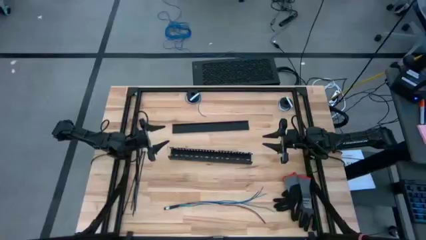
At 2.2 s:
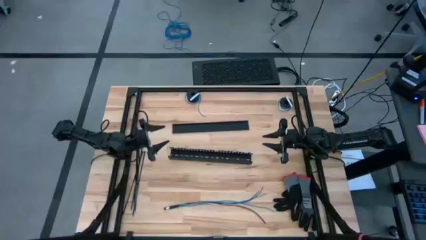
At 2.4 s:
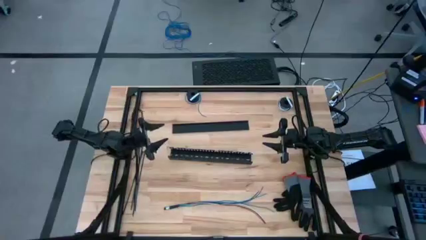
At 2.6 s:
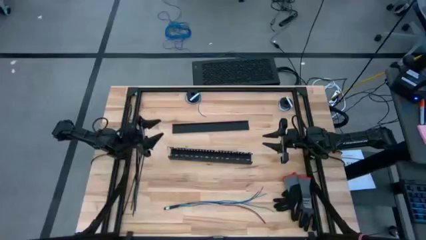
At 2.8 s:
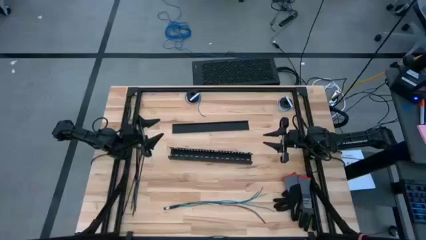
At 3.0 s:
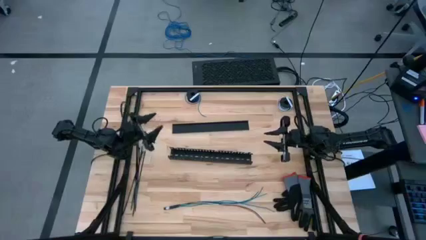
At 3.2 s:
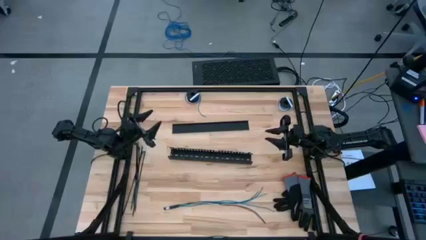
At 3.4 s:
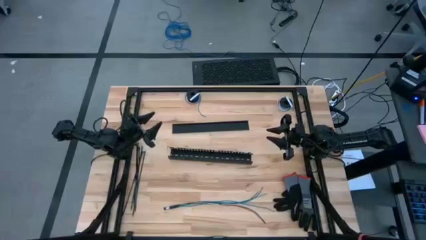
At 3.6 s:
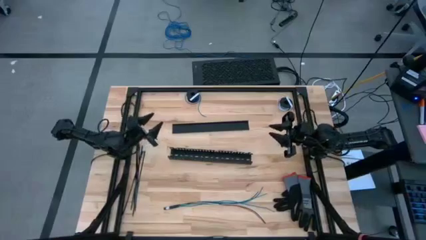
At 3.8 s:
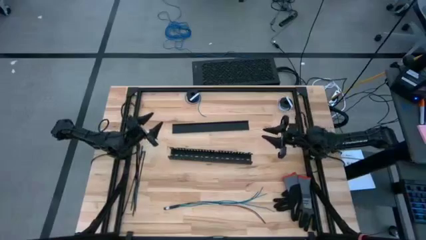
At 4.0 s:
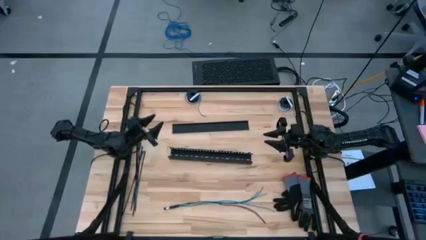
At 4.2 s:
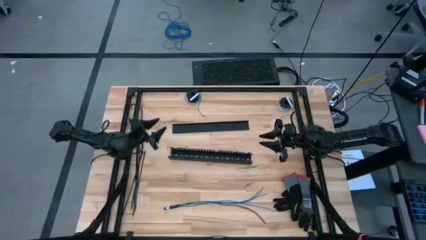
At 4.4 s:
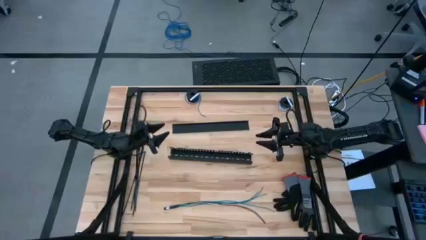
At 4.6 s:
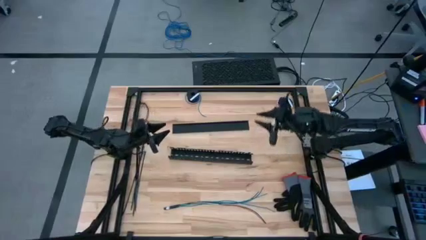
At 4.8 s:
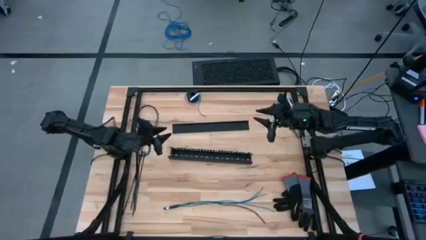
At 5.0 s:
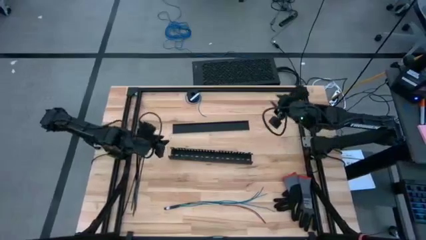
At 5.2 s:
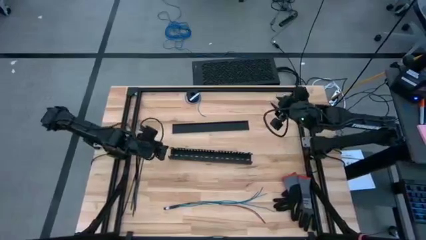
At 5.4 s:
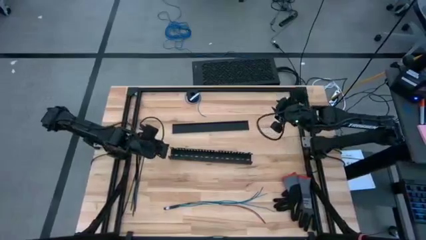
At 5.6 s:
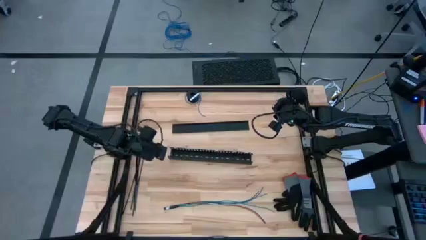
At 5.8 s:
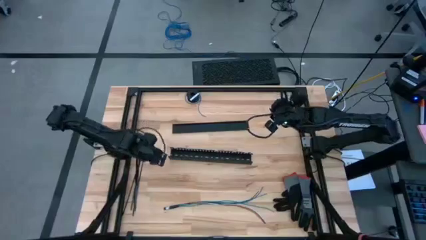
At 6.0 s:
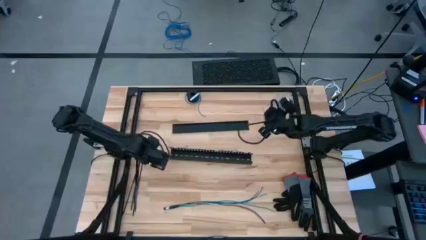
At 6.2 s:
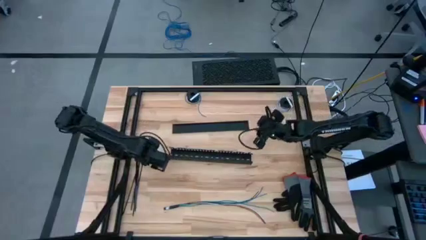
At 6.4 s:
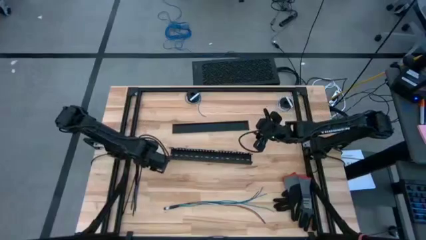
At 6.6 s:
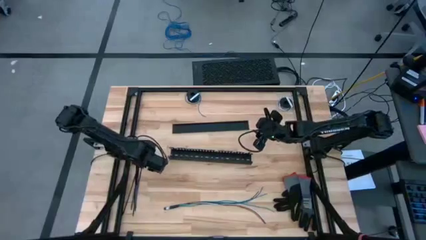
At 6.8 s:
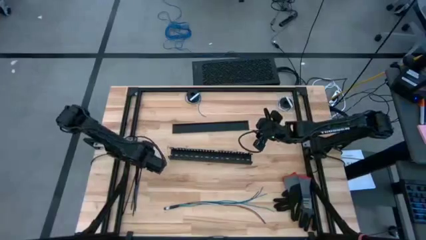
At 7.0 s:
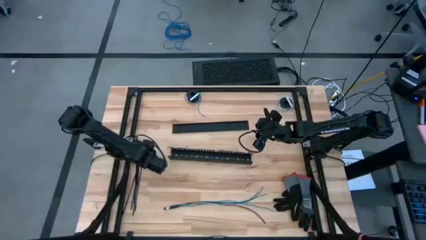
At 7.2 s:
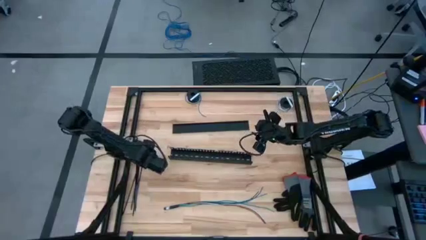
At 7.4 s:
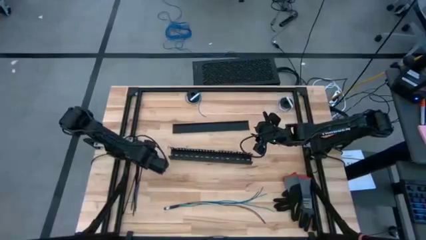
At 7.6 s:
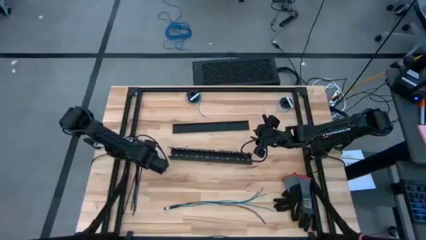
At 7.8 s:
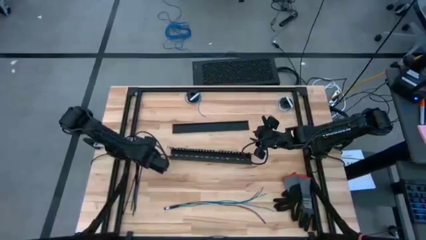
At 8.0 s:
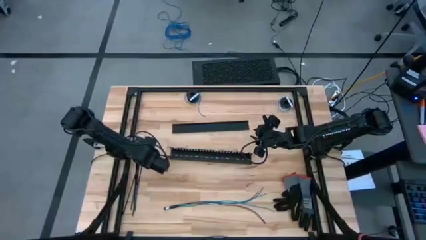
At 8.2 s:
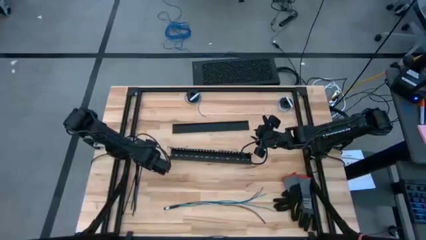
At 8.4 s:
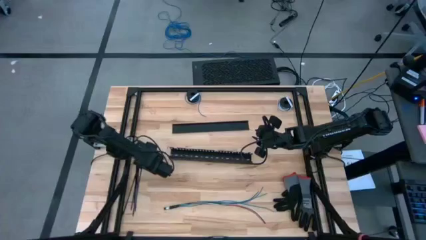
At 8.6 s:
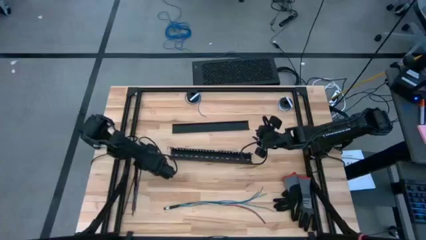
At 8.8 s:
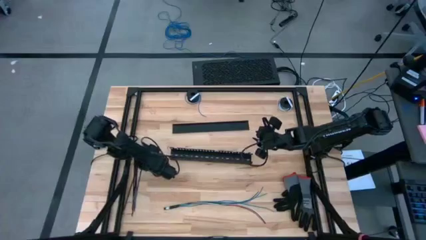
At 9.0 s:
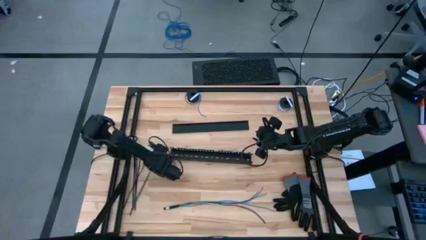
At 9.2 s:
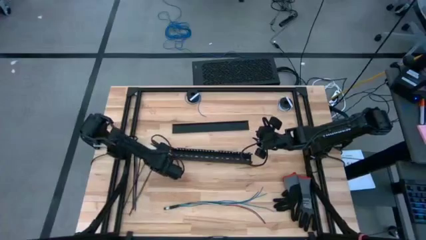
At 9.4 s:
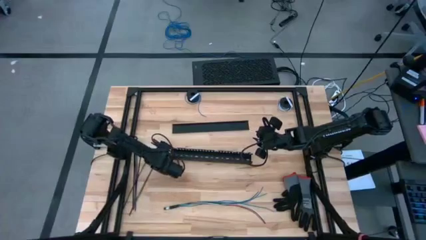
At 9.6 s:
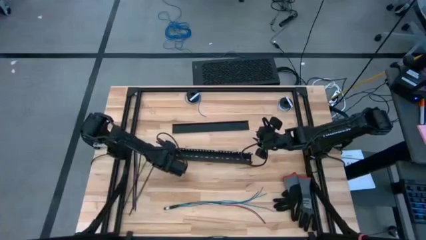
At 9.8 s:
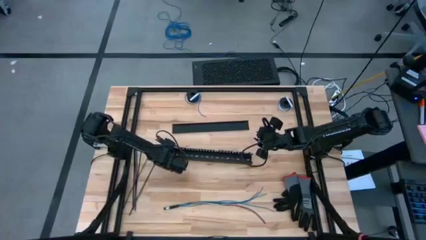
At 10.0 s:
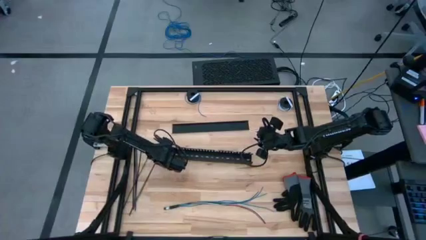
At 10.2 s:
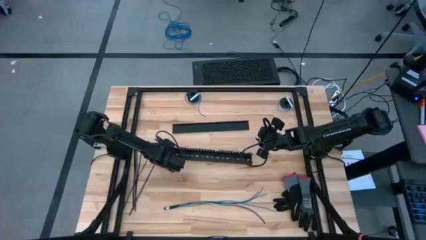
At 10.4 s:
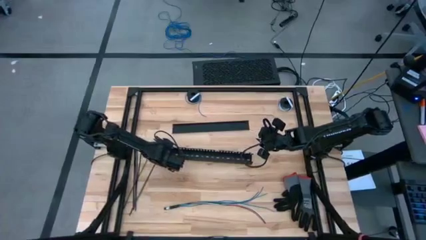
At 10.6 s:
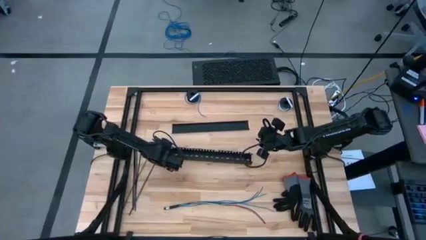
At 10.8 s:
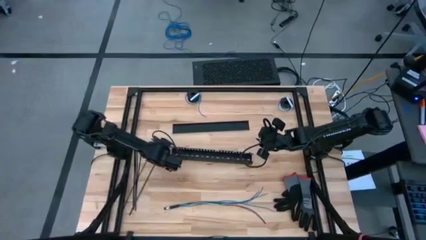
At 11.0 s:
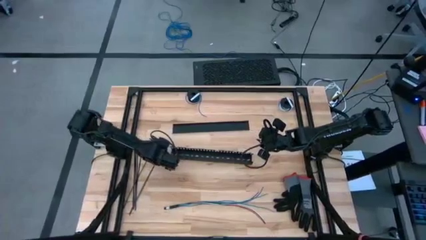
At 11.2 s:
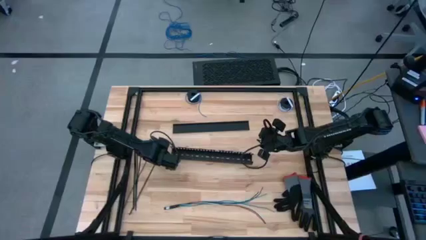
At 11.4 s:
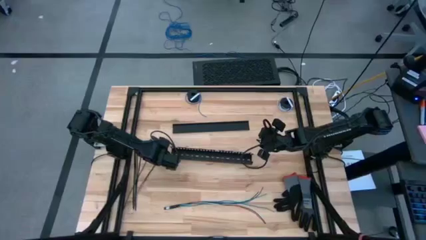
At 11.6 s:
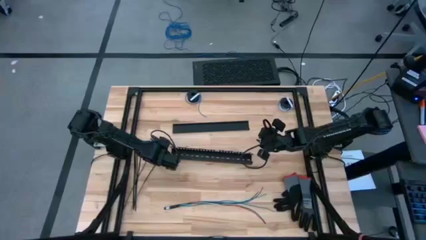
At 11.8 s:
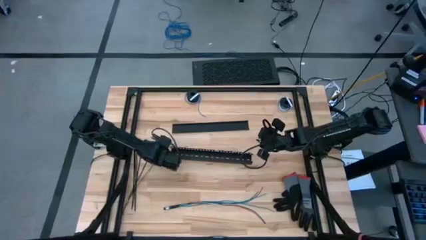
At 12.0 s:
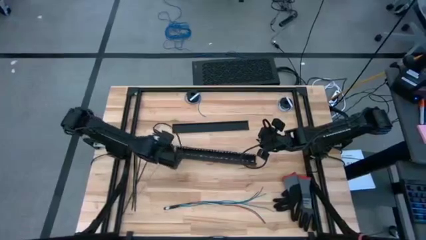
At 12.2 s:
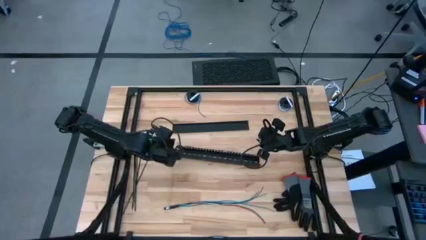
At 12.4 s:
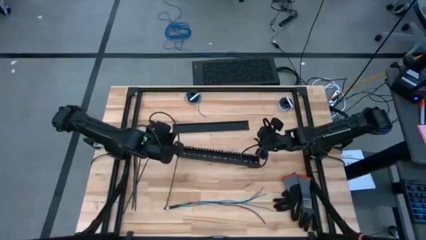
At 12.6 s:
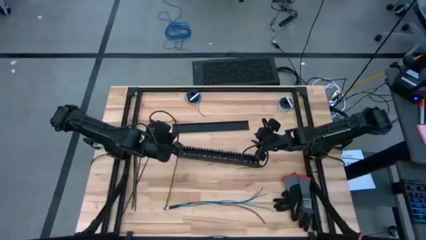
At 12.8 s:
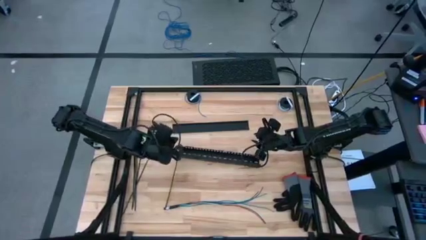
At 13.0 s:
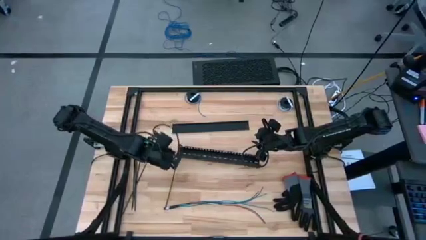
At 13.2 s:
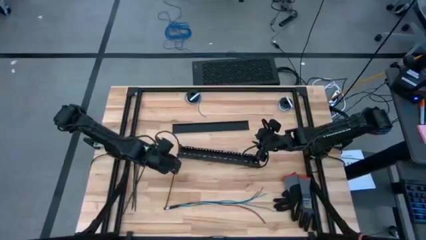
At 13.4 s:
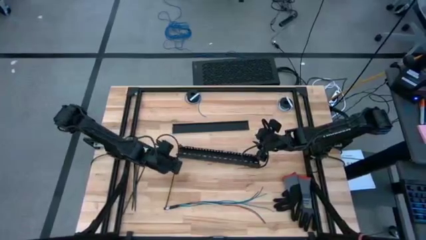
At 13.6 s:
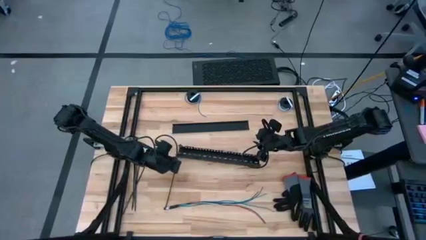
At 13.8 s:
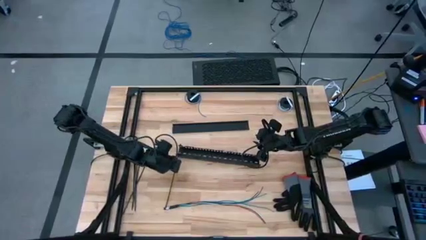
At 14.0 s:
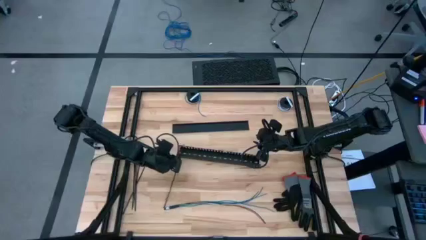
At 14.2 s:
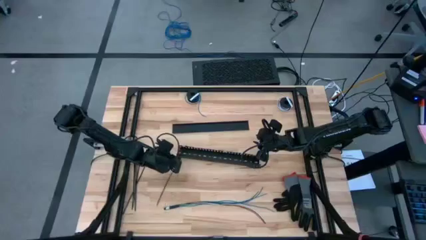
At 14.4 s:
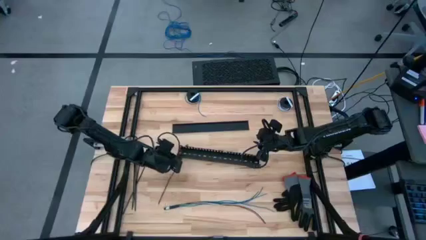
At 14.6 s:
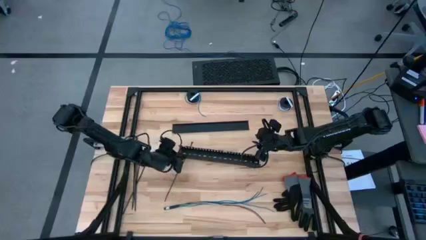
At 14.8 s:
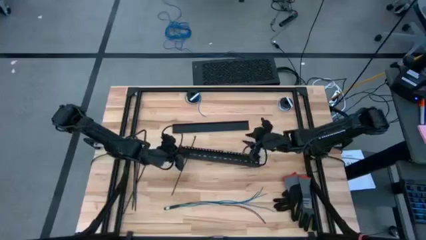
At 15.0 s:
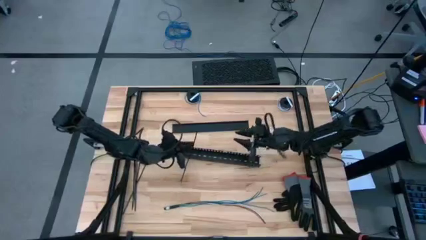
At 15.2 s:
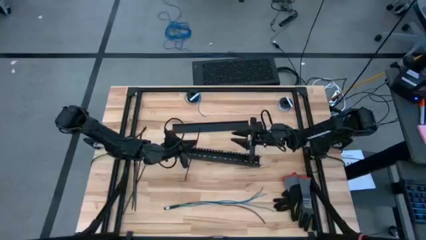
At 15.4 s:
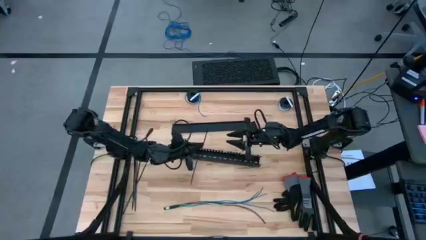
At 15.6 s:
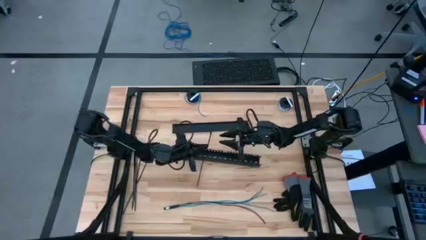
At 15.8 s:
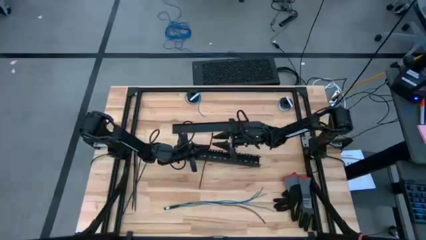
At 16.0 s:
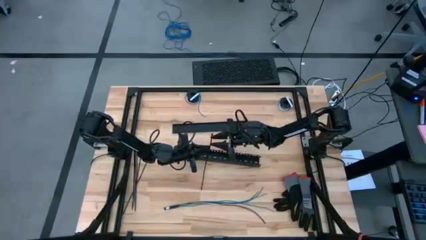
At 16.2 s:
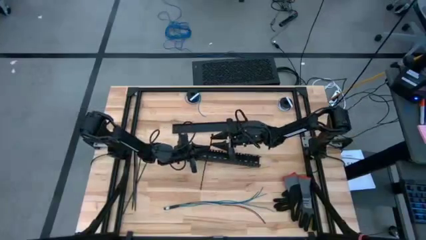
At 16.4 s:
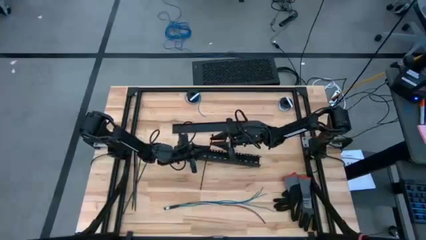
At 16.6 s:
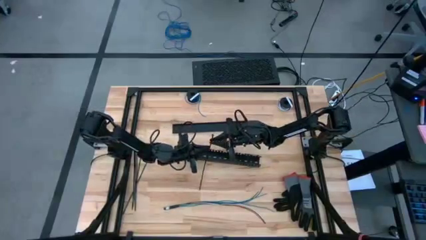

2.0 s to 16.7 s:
Task: Ziptie cables
Wrap the cable wires with the black zip tie
